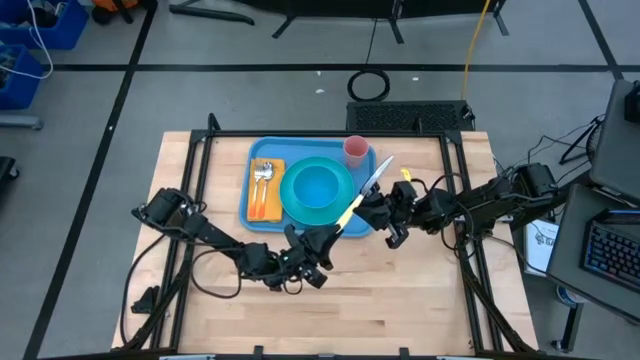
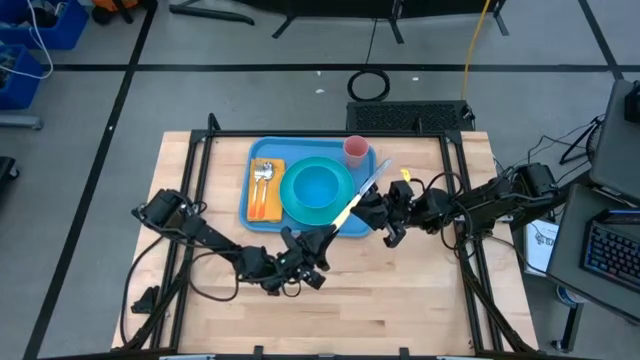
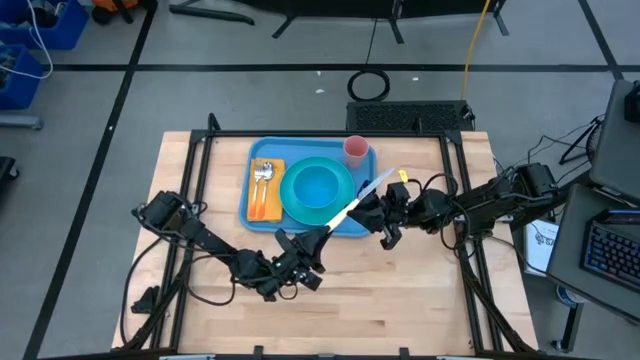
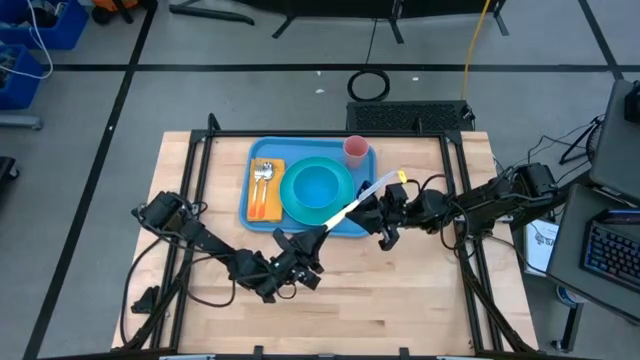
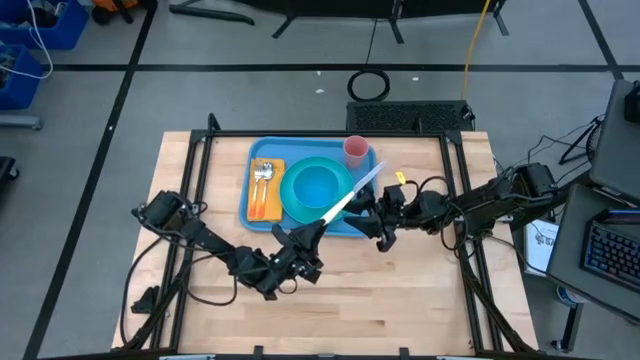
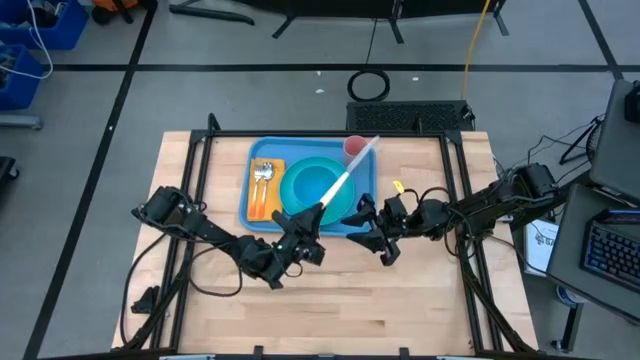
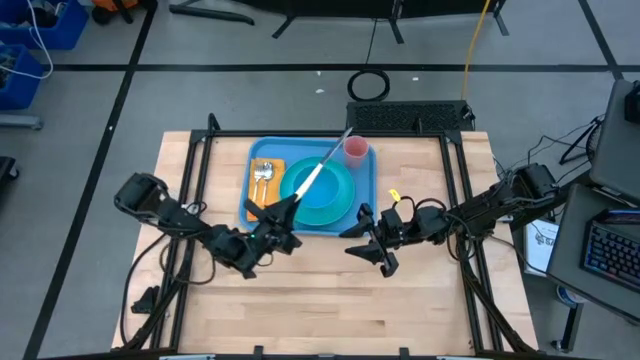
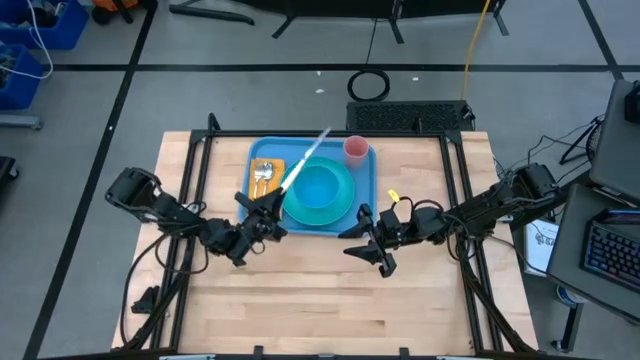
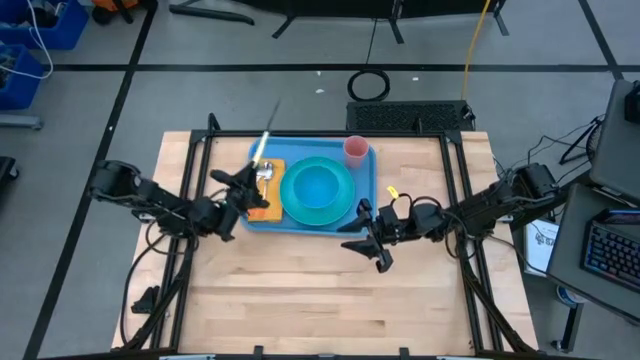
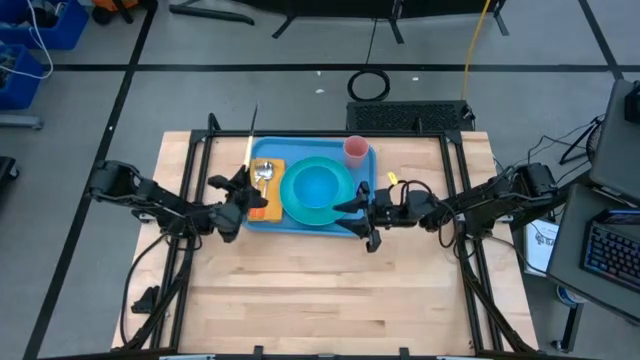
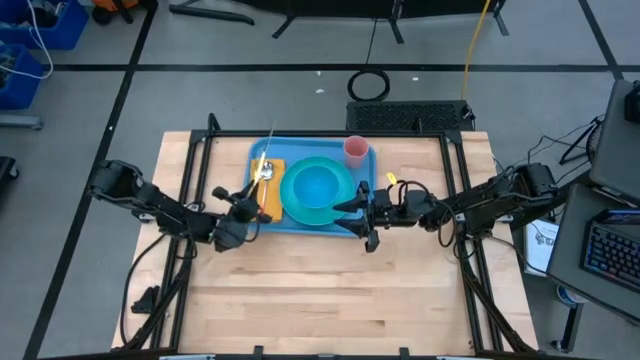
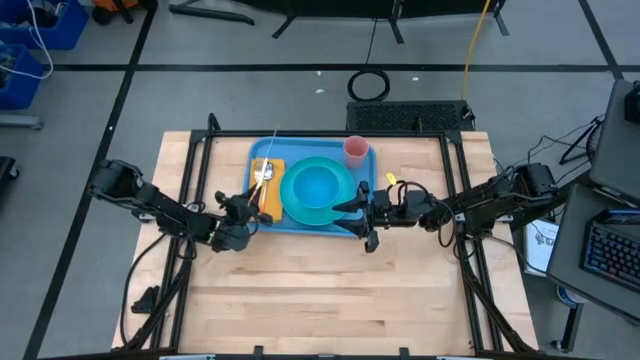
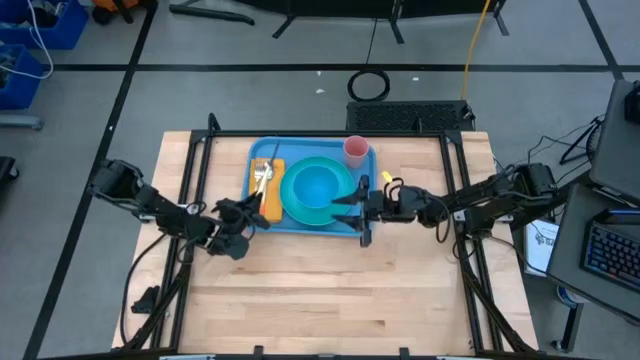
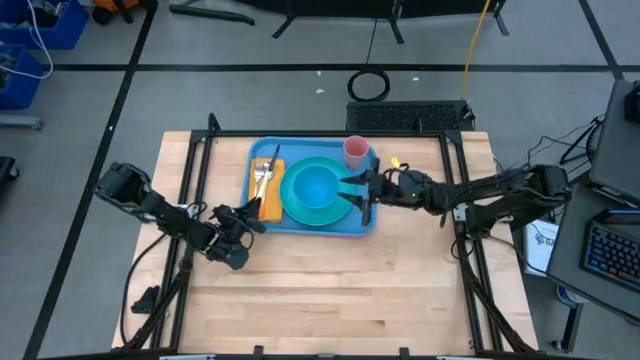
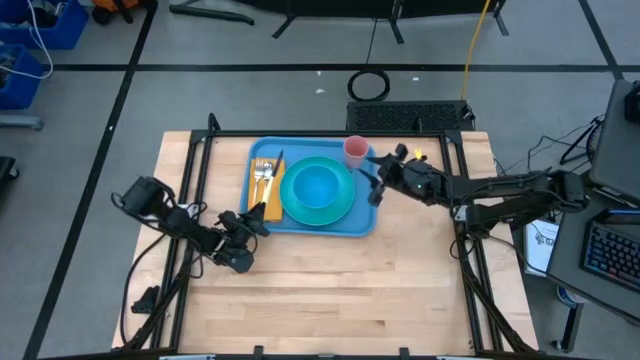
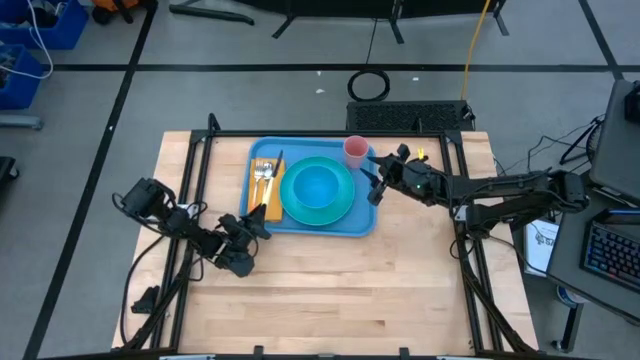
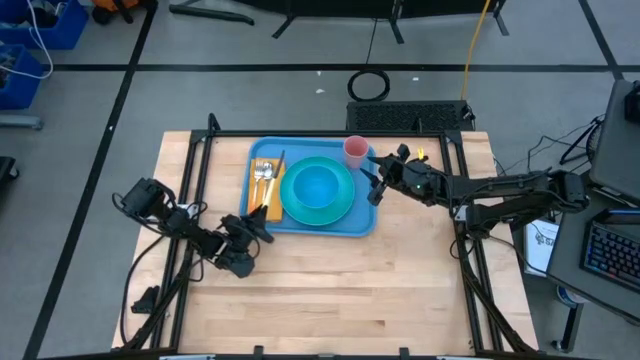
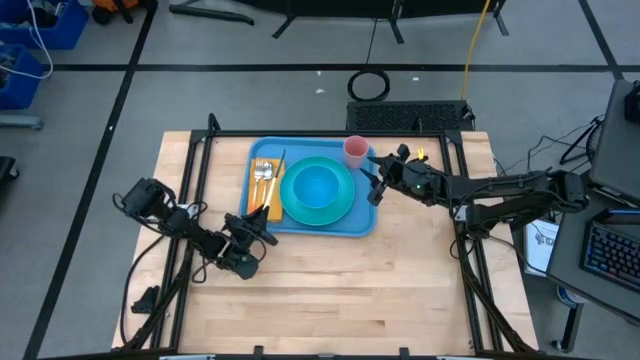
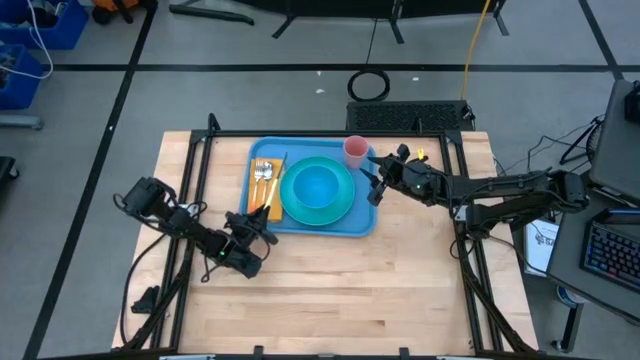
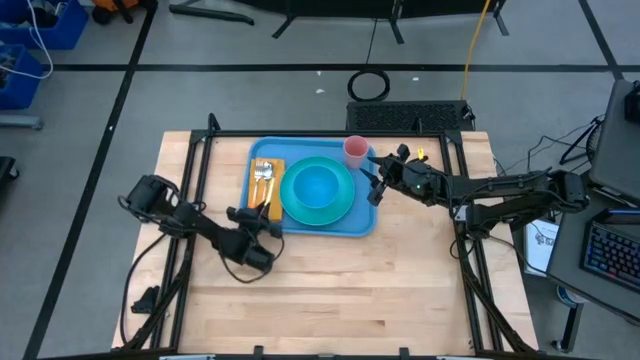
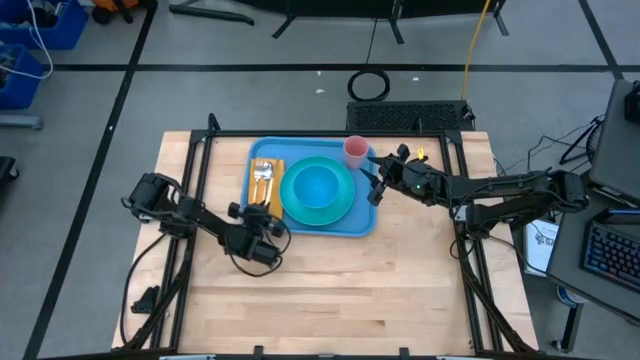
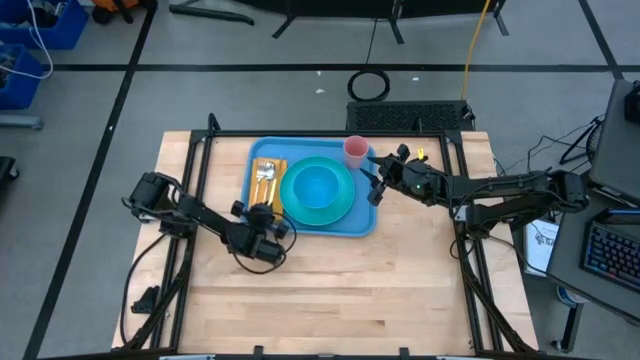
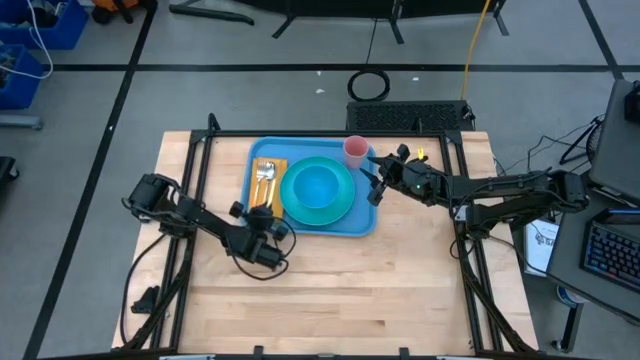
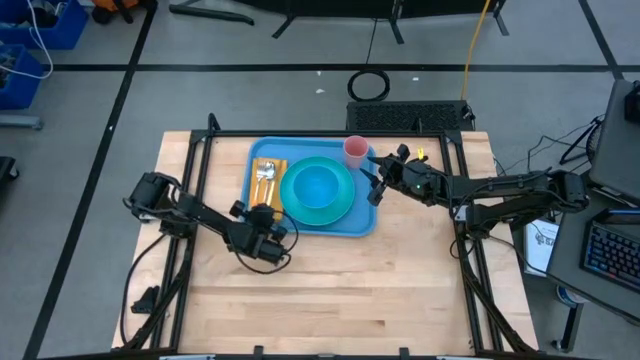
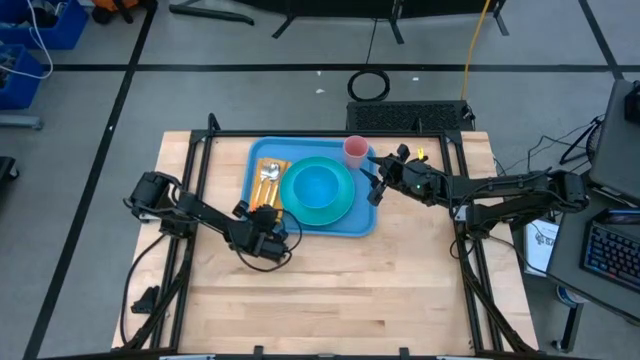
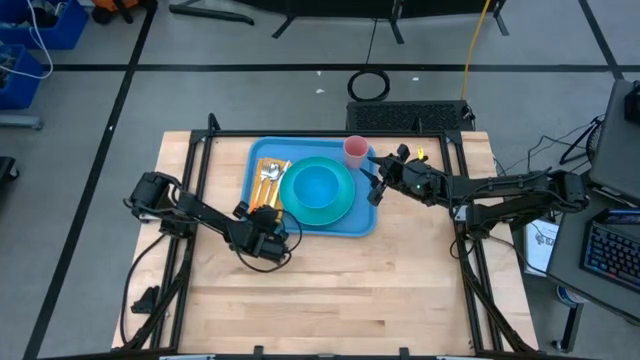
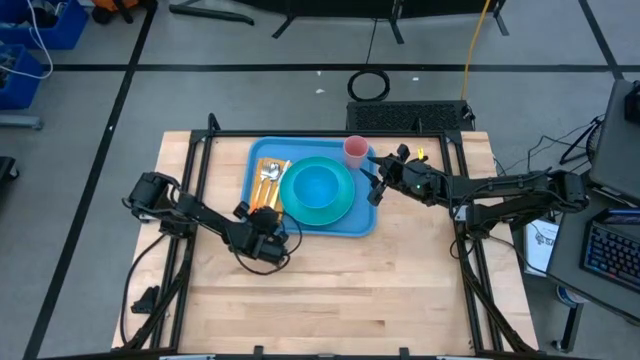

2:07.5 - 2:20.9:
Task: Set up tray
Put the yellow knife on the yellow napkin to the right of the orange spoon

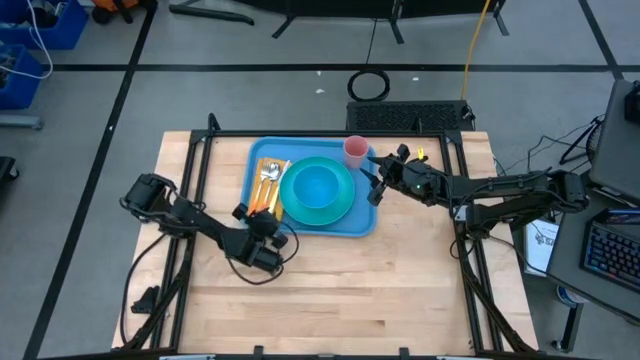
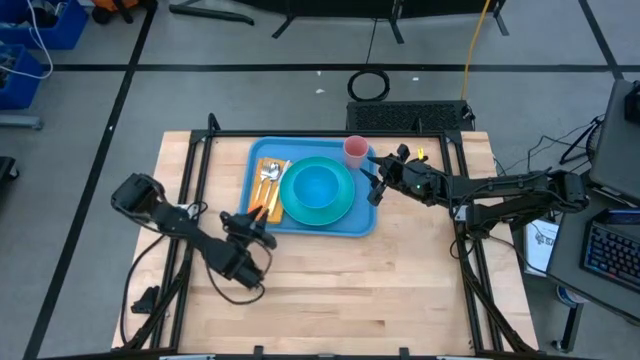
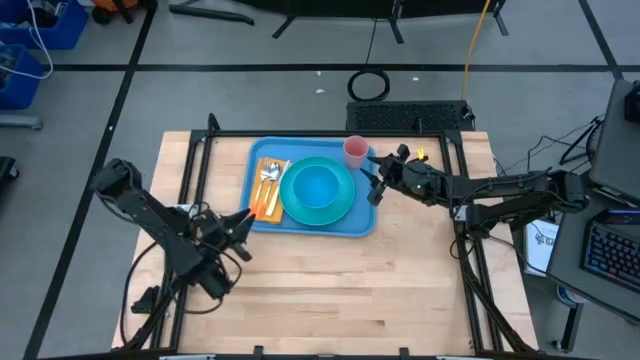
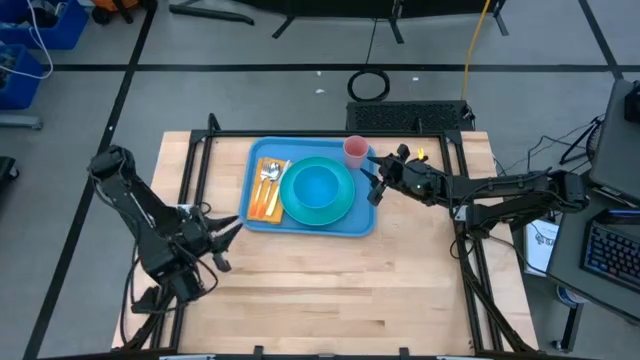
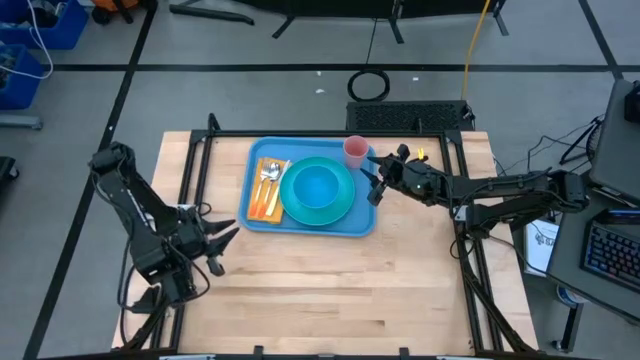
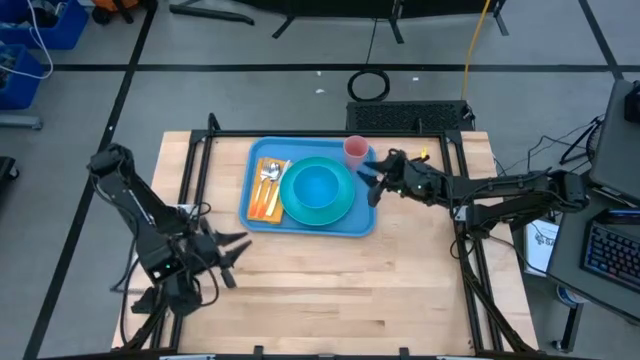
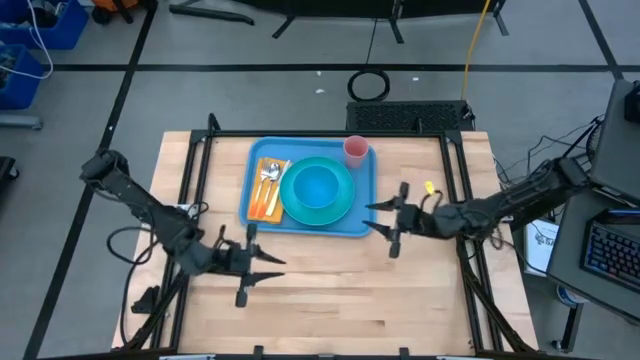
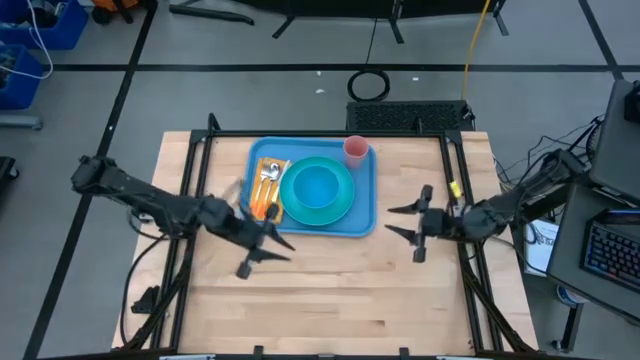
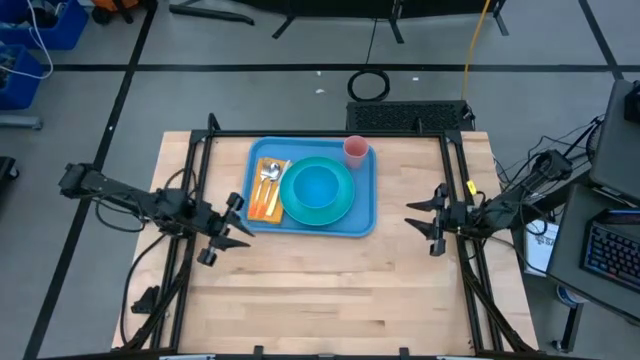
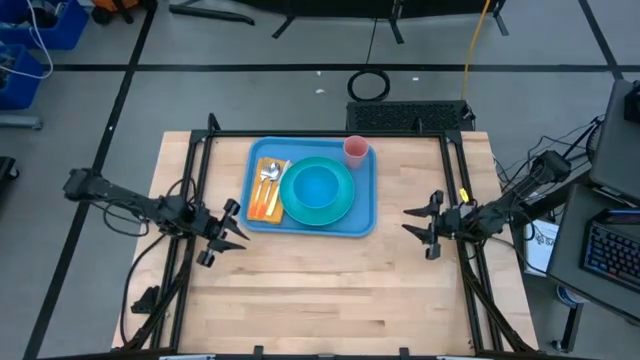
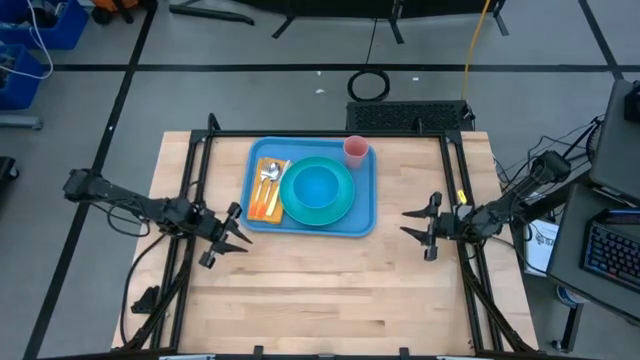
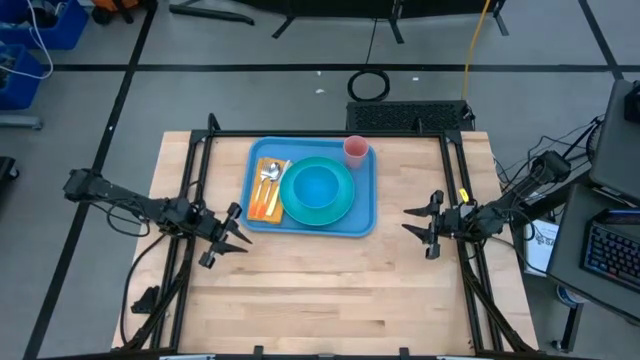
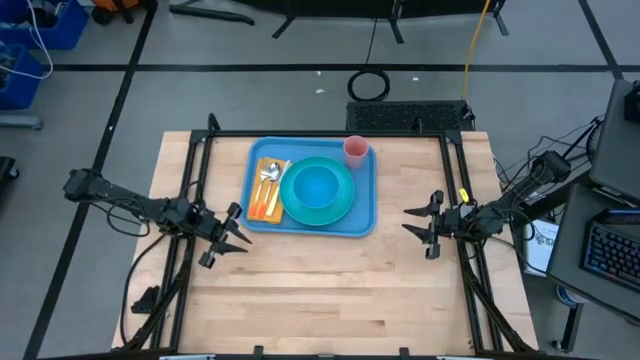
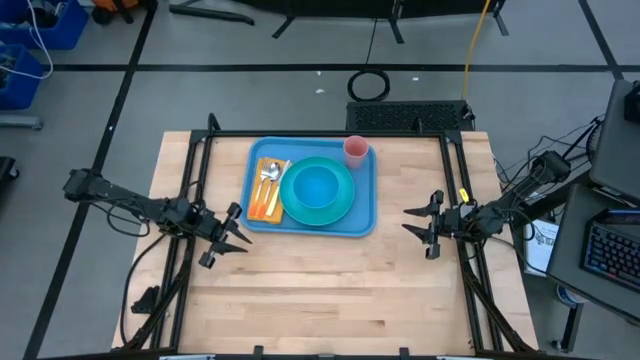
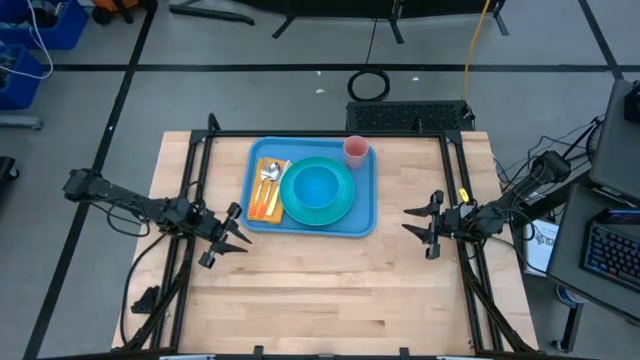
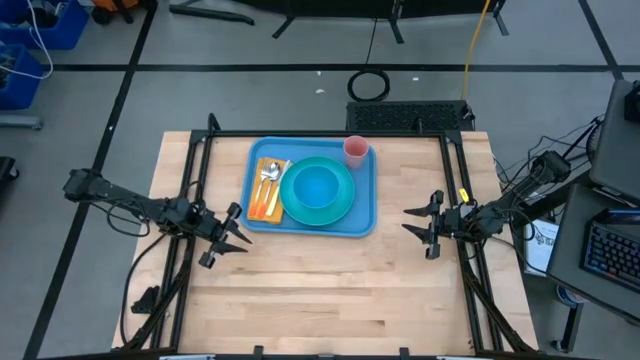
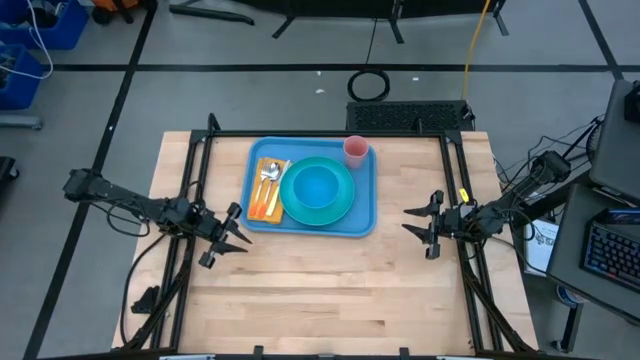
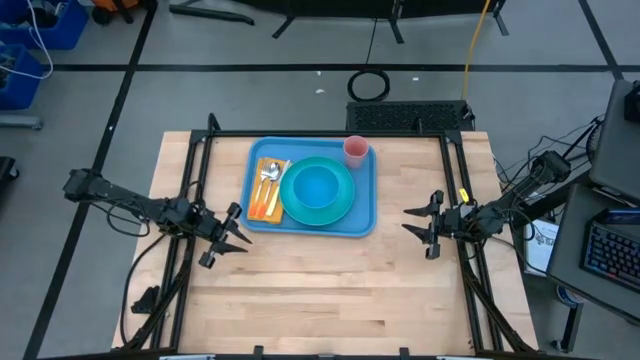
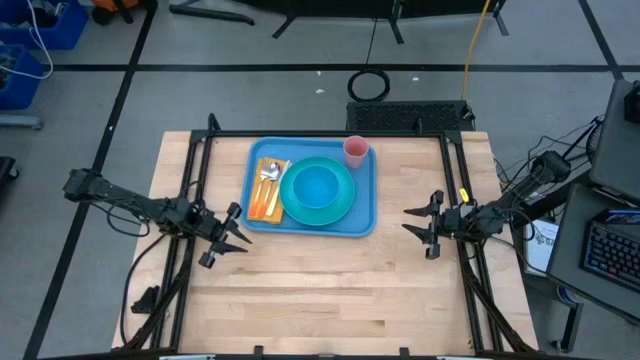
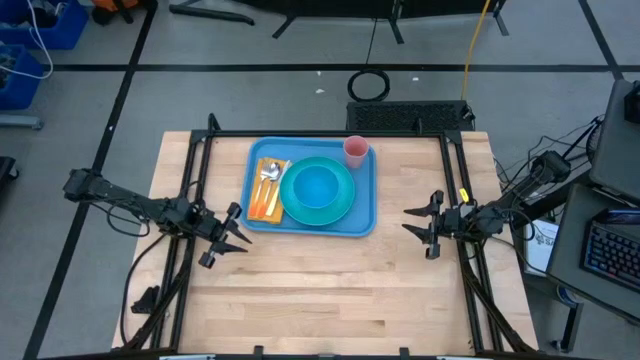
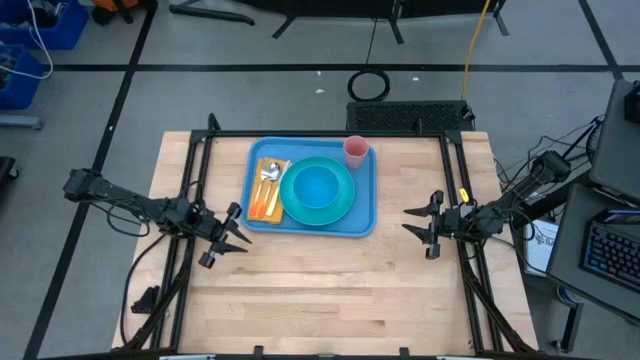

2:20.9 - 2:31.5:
Return to Home Position
